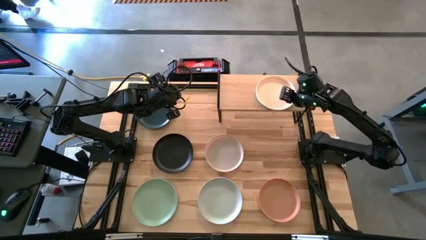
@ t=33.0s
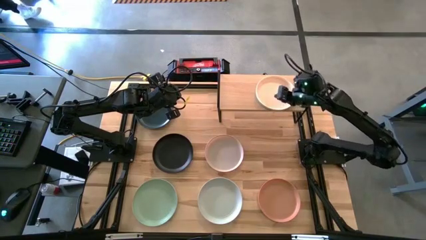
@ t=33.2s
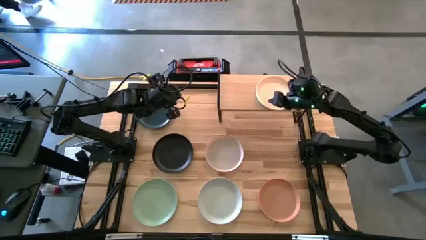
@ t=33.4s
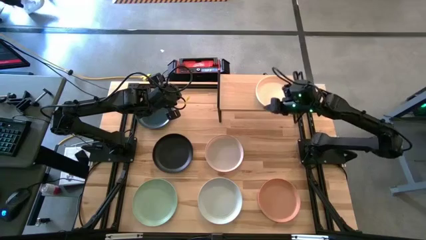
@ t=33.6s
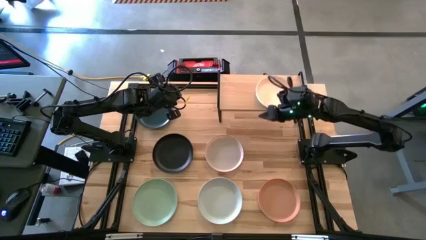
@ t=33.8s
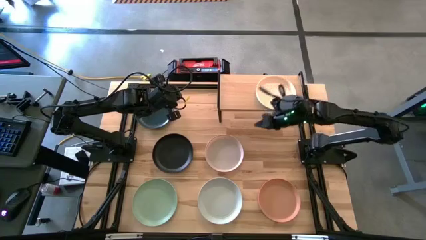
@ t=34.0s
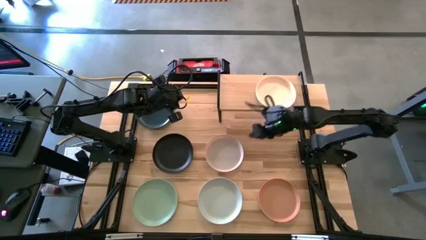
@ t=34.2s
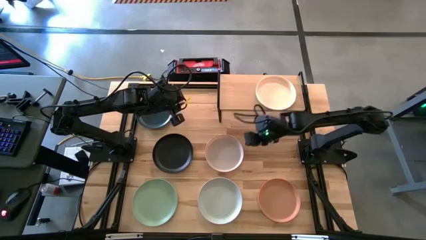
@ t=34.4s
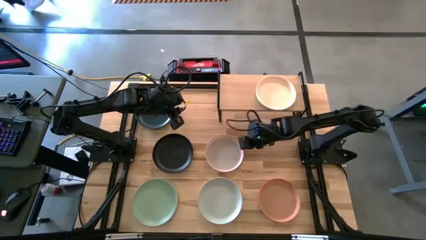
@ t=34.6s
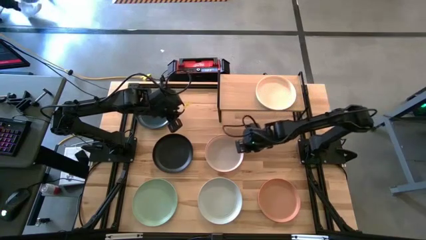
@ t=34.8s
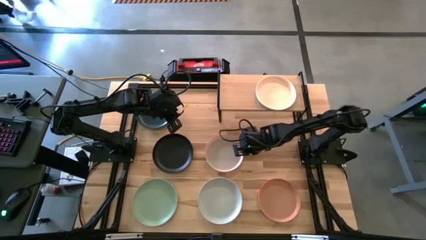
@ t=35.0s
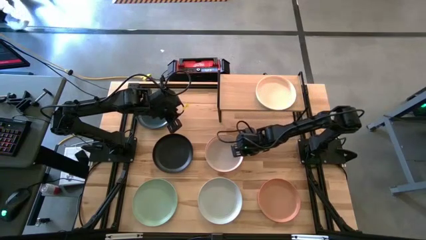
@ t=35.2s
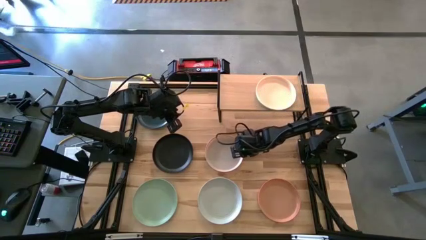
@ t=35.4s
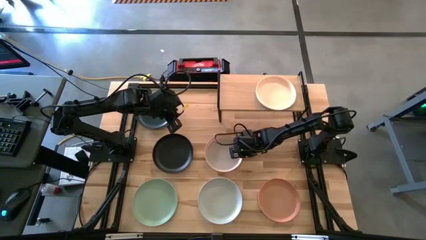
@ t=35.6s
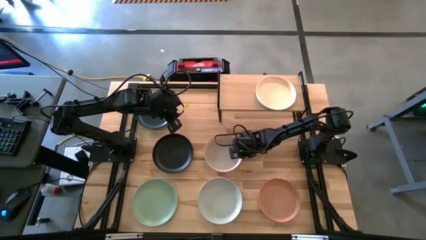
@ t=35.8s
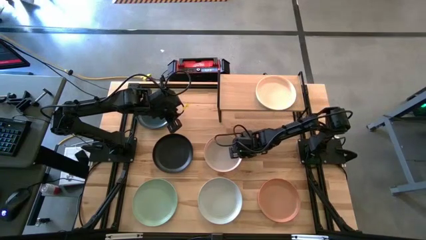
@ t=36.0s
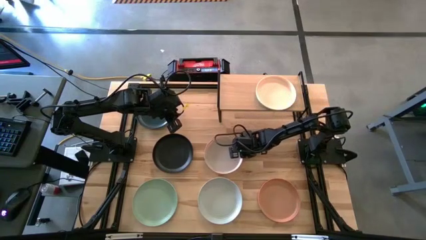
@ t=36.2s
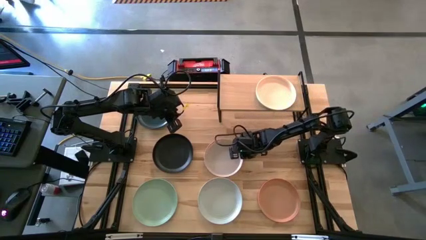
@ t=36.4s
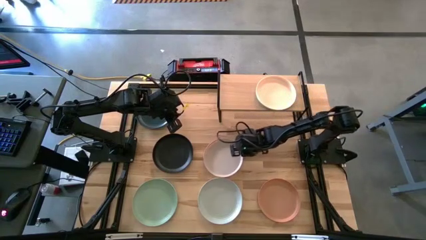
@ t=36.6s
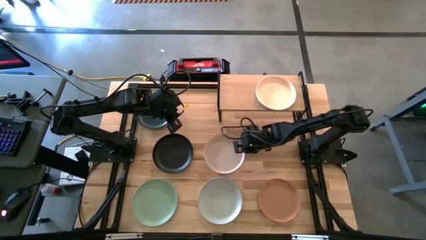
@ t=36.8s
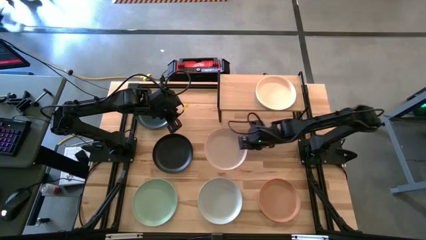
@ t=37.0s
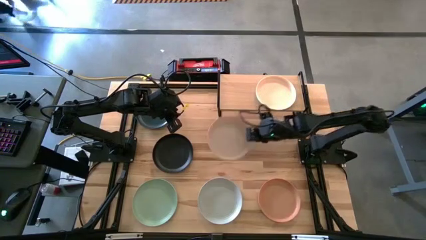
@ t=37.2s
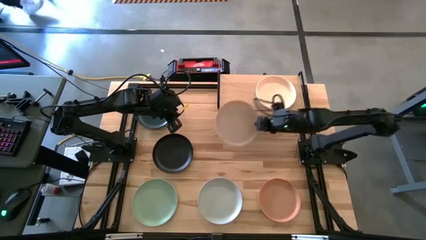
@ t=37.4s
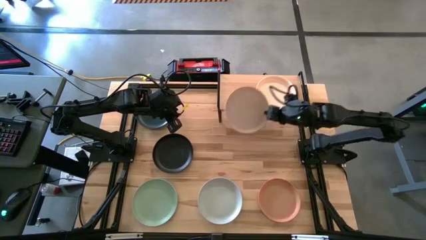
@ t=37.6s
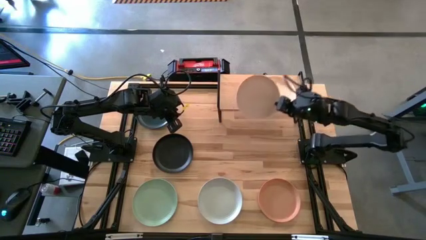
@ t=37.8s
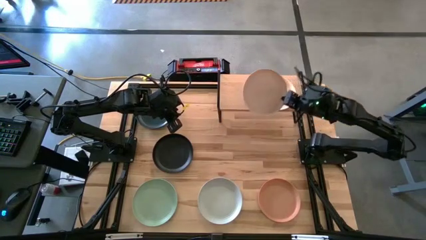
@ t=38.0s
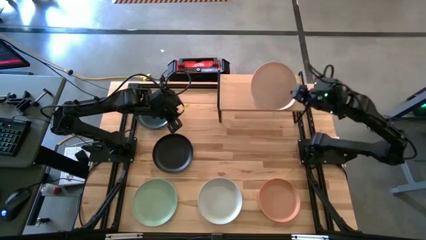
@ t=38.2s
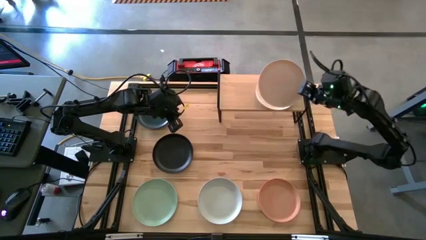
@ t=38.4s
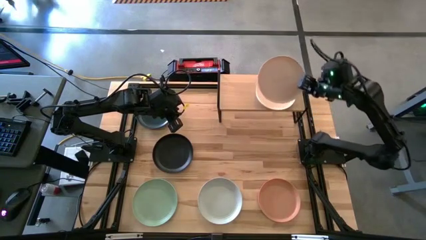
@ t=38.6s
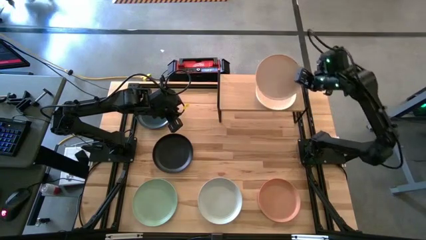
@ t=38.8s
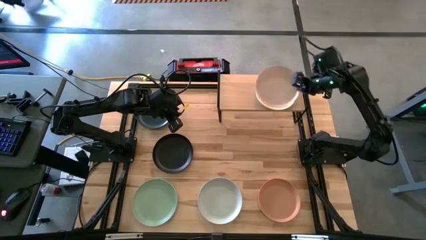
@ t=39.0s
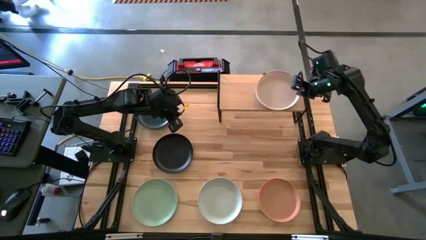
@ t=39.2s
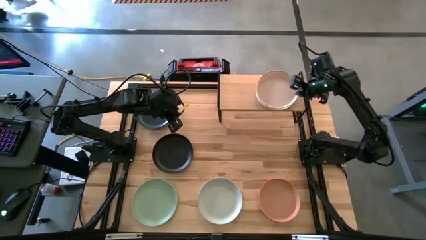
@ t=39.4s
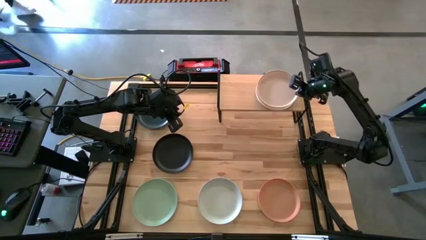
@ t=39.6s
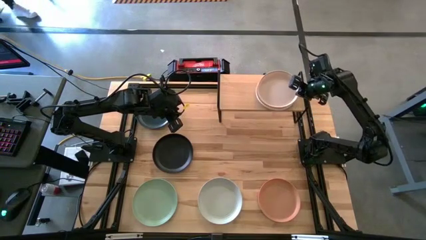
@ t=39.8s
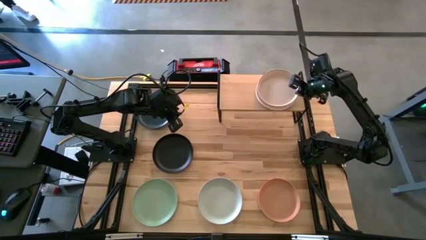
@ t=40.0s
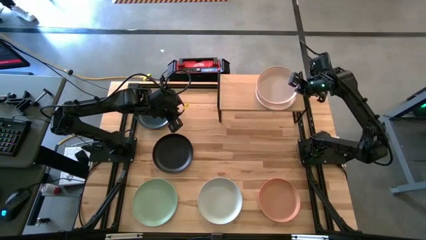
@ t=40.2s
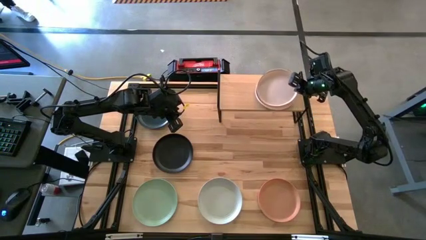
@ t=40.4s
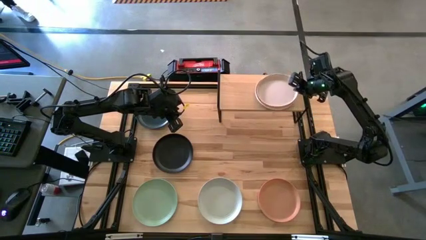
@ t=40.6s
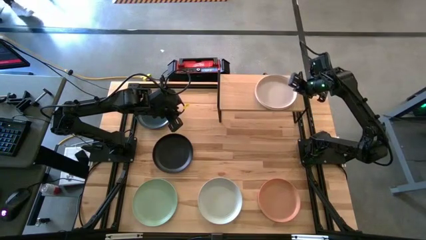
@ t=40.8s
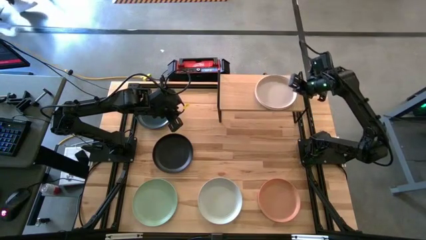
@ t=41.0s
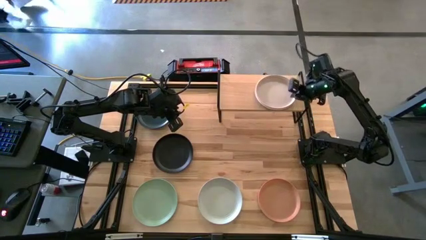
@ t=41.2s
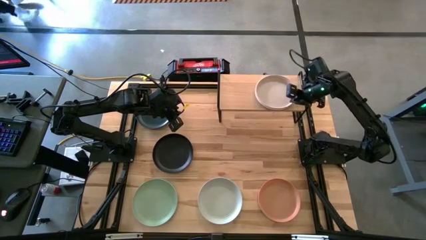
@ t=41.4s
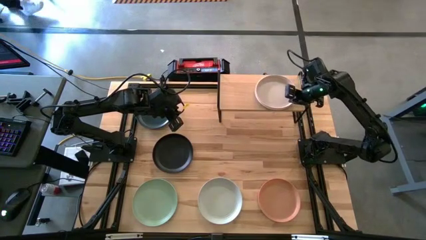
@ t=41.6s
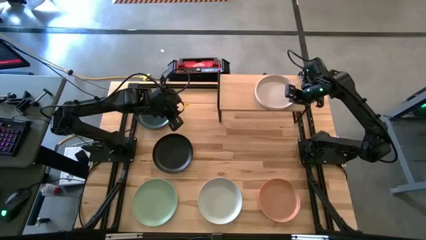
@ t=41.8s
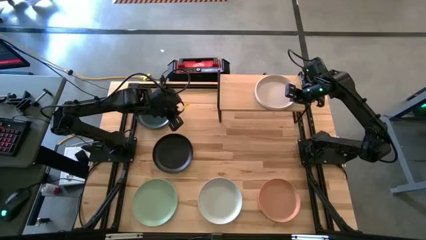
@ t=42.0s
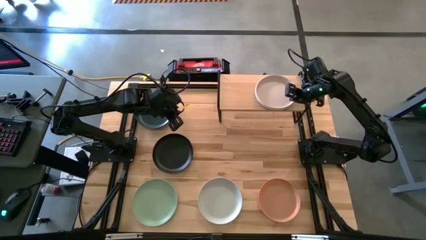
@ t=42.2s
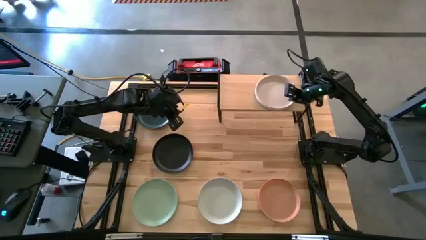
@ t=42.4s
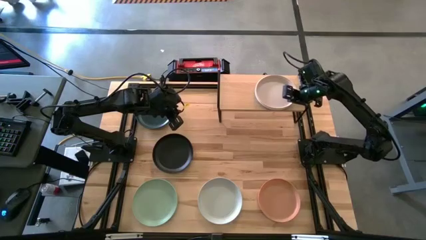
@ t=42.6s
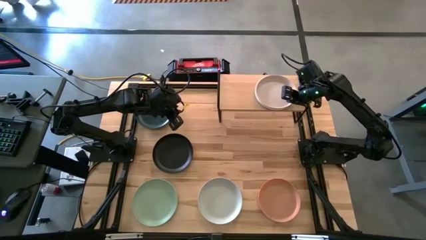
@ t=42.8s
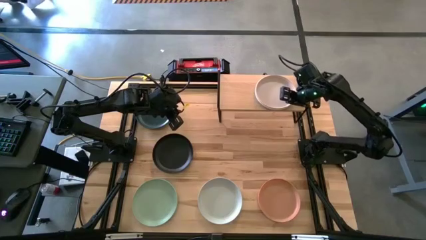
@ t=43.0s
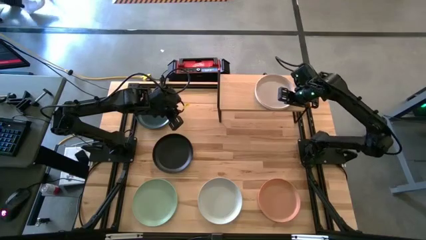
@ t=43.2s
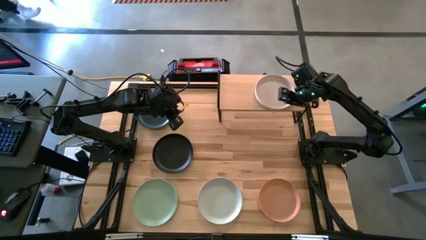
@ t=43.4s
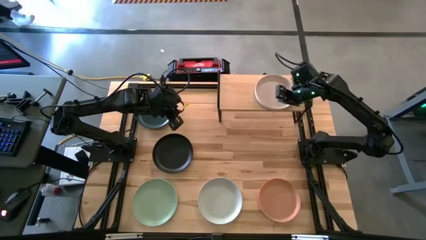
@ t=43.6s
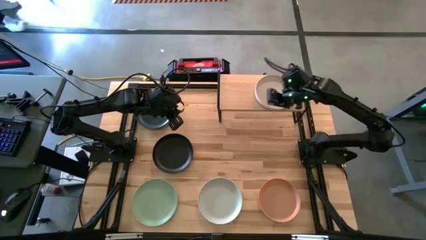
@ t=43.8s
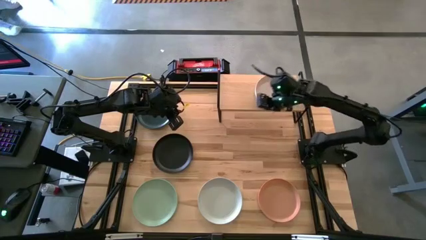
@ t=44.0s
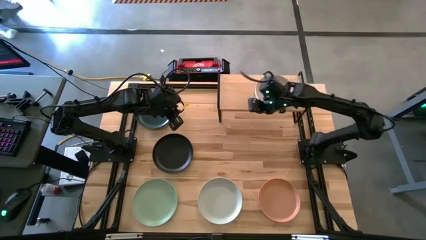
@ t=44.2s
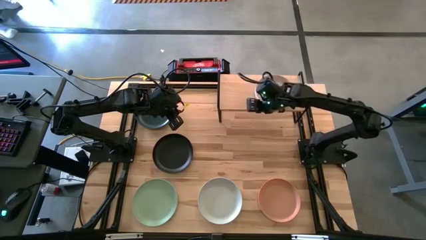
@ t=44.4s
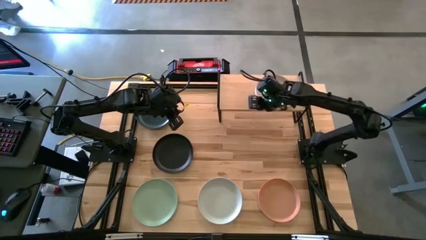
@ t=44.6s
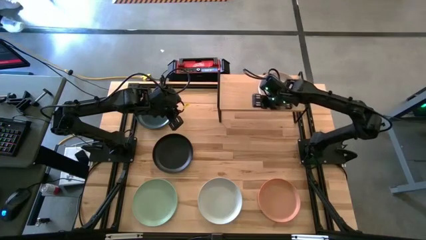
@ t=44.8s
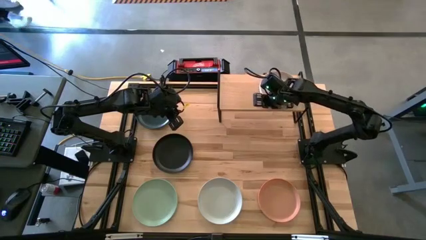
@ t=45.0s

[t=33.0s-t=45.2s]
Task: Place and stack plates onto a shelf
Stack the white plate on top of the pink plate on the shelf

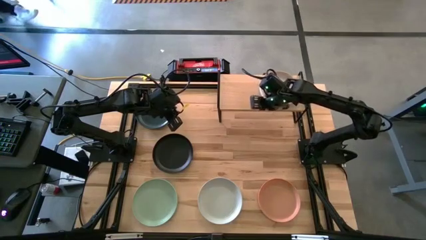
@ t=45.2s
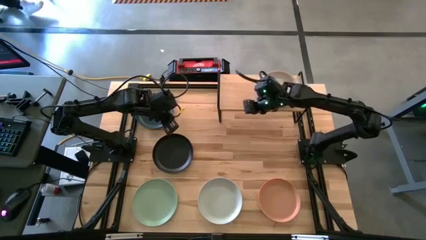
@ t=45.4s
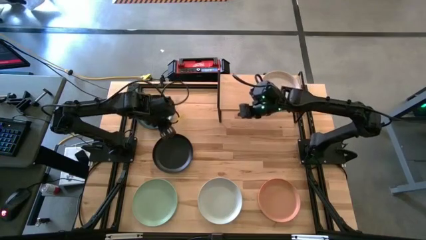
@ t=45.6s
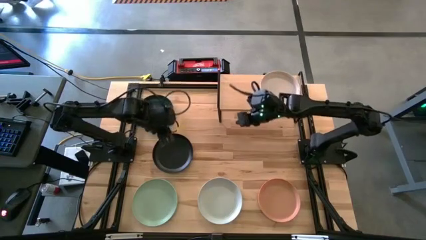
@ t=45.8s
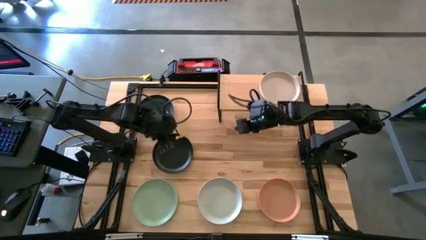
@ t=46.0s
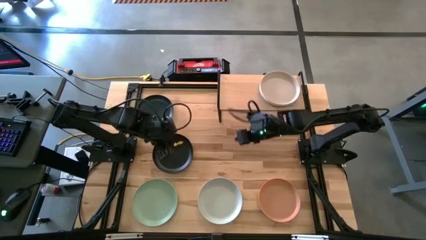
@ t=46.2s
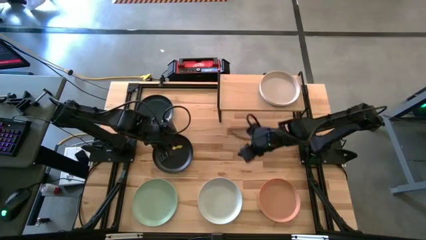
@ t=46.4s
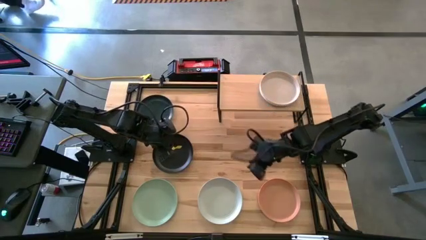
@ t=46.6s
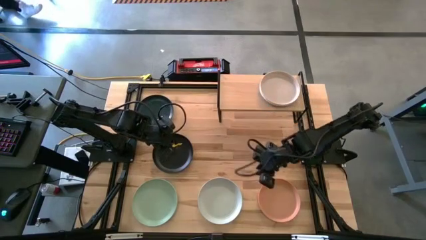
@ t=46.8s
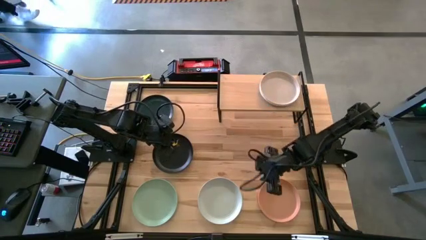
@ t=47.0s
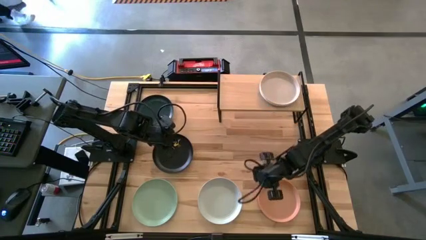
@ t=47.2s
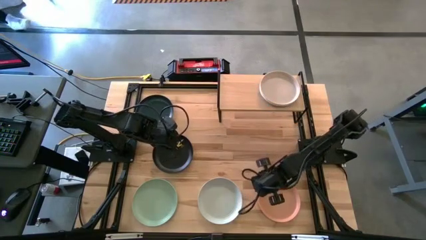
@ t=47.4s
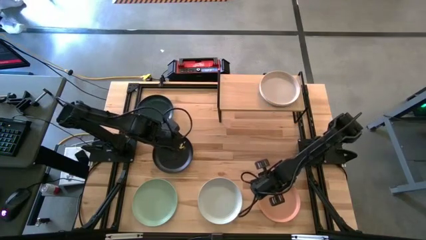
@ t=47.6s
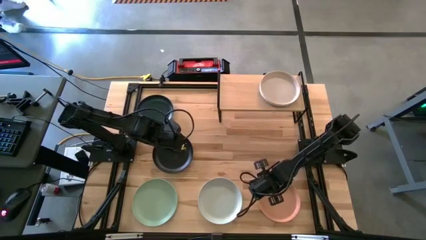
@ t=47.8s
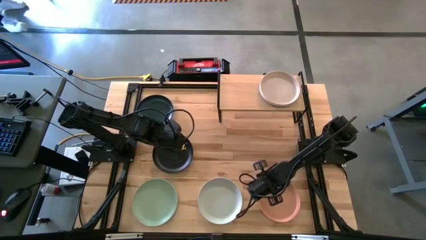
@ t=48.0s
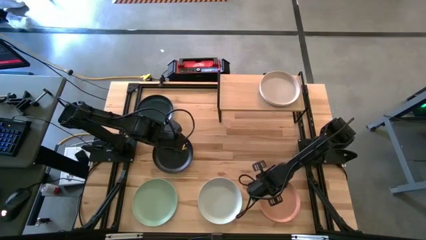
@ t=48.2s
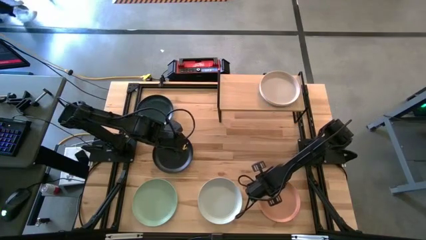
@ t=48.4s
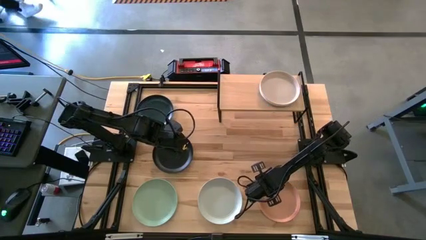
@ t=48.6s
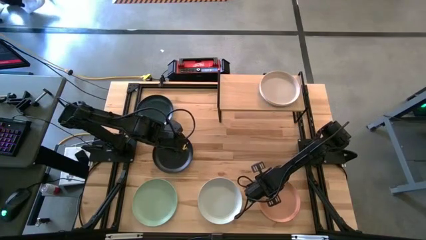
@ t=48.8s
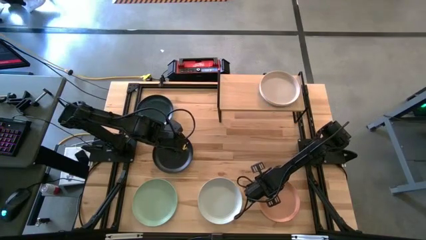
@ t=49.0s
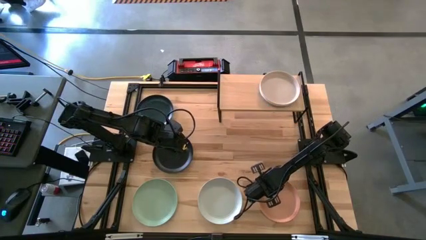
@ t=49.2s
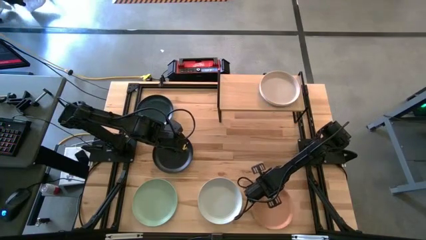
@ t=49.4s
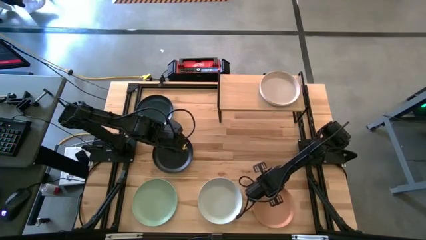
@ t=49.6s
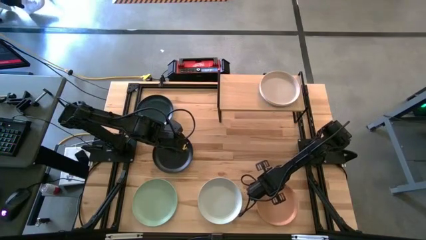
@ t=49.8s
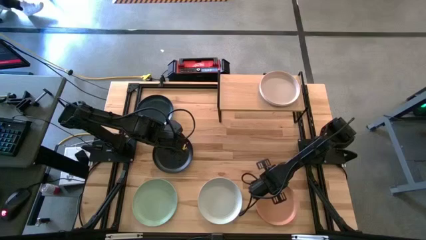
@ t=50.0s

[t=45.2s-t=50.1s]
Stack the orange plate on top of the white plate on the shelf
